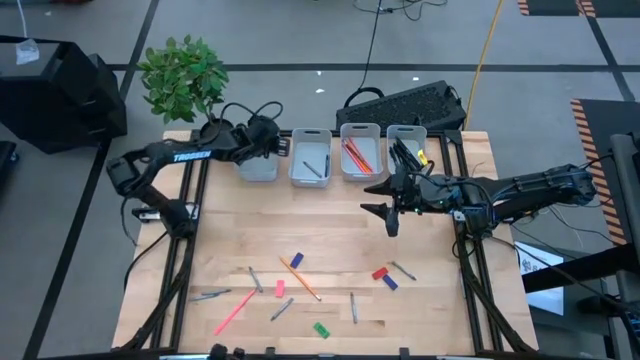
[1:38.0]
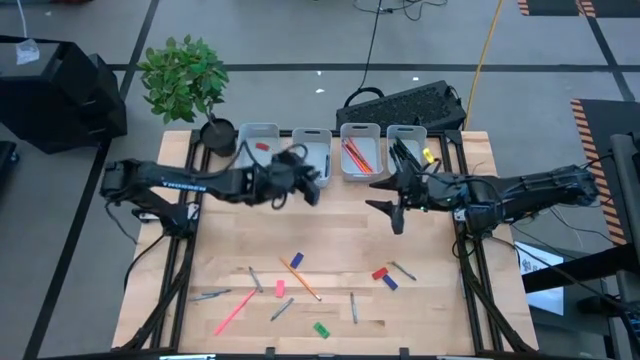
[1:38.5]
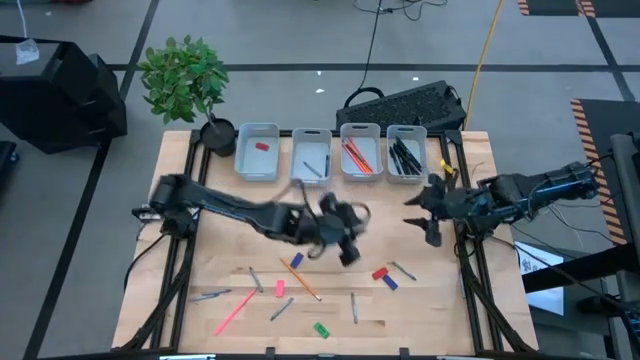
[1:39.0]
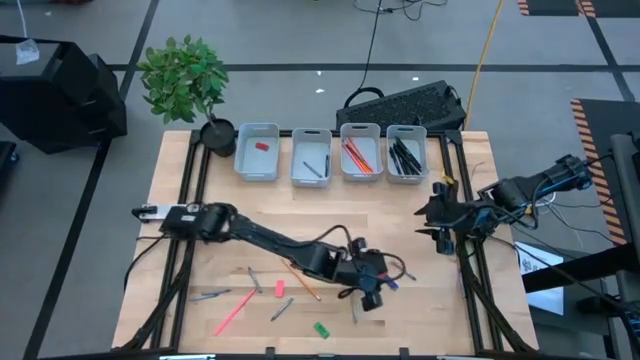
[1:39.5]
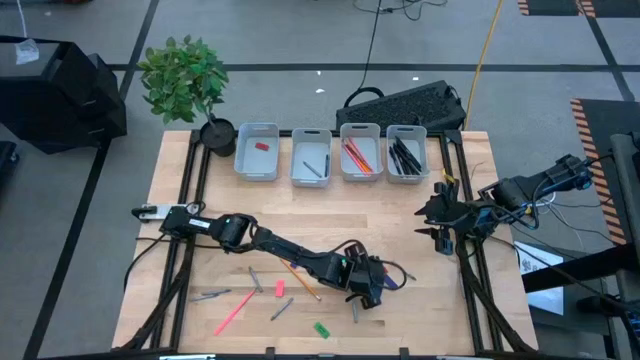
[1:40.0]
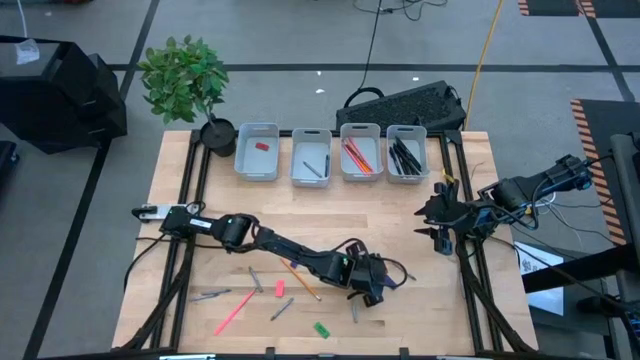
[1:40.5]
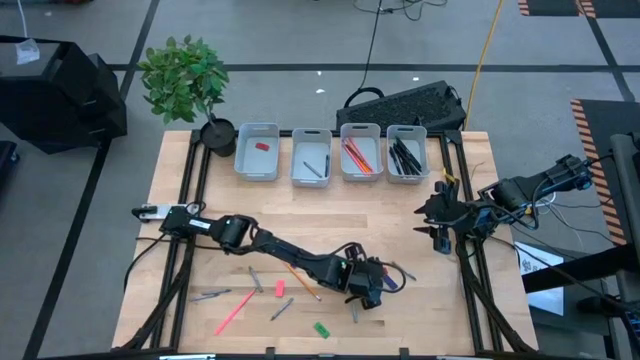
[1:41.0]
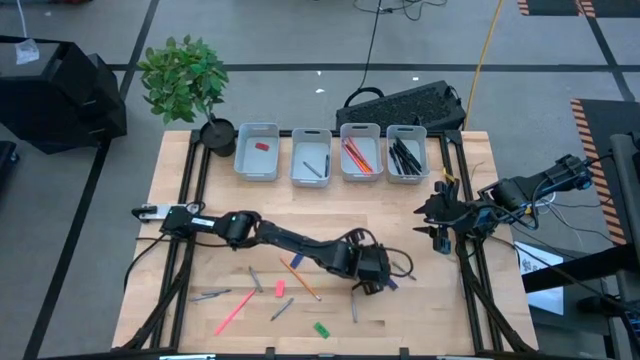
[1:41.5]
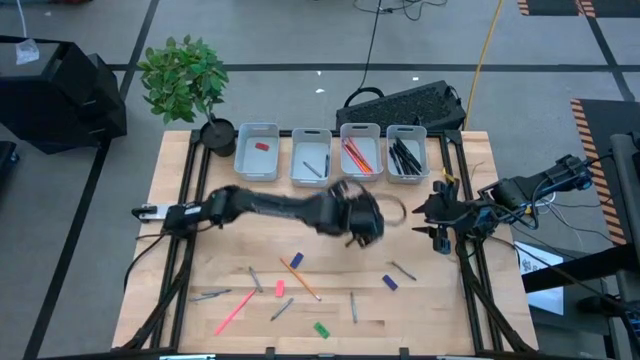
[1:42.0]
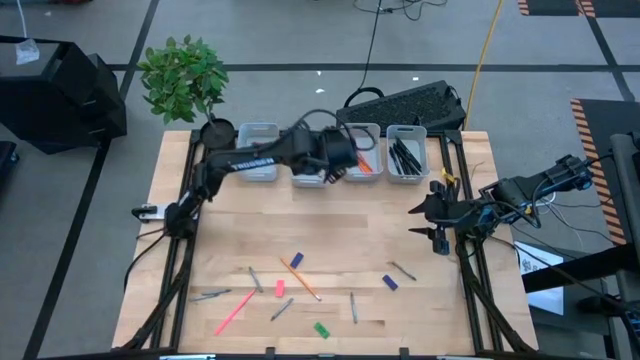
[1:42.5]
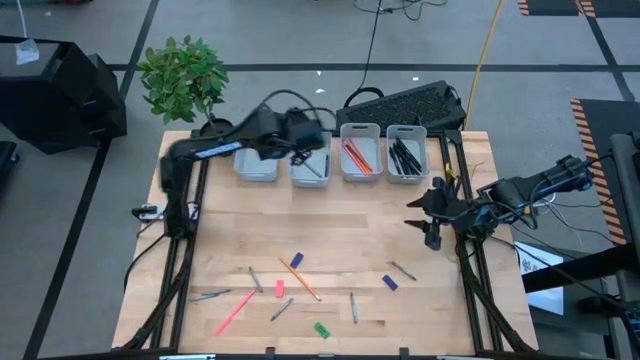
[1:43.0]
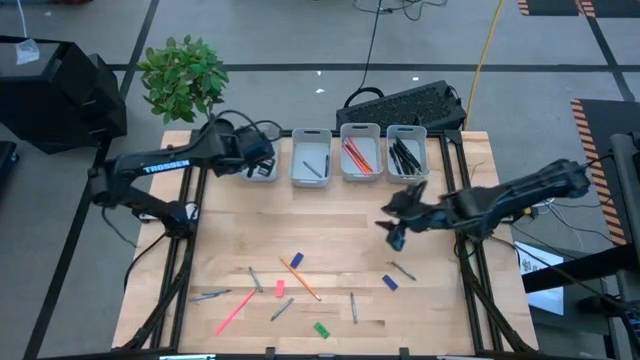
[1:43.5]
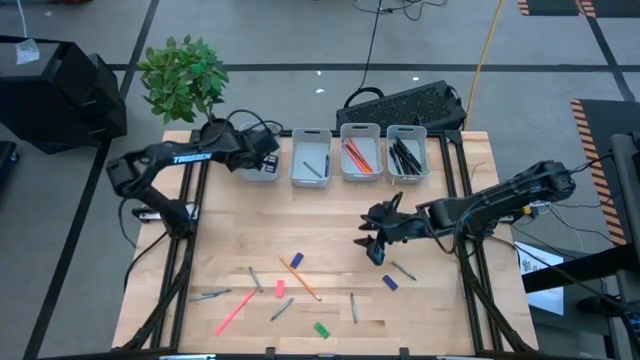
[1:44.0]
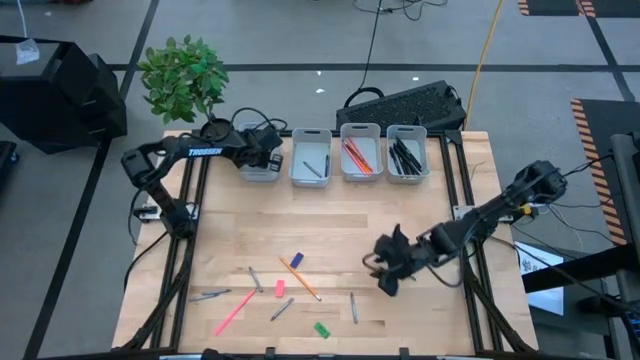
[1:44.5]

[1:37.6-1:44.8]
Task: Sort crayons/erasers/pens/pencils in bins
Put the red eraser into the top left gray bin

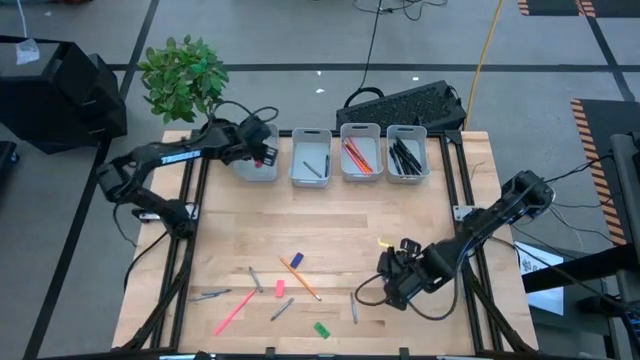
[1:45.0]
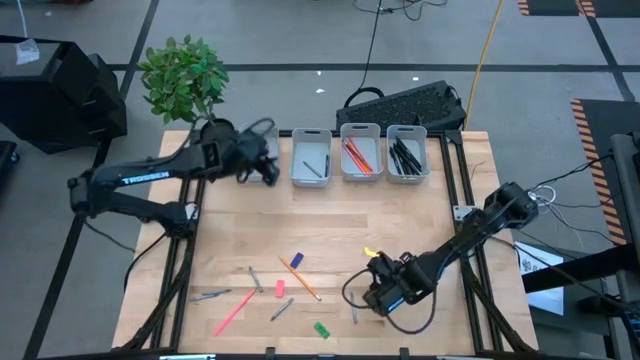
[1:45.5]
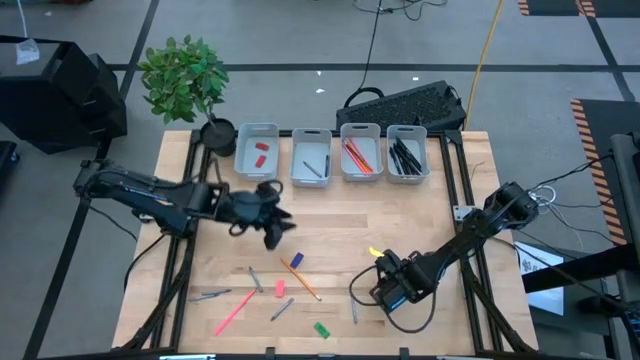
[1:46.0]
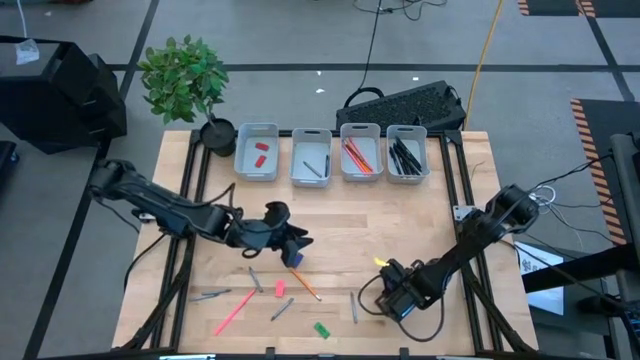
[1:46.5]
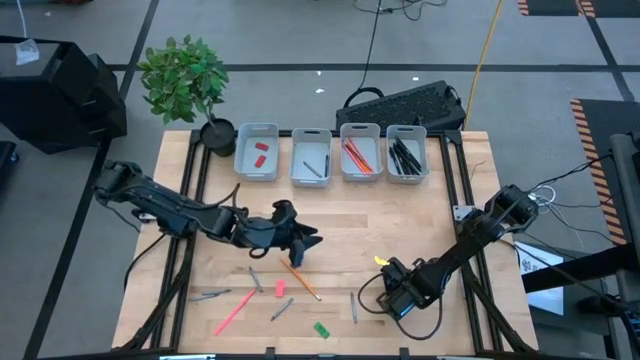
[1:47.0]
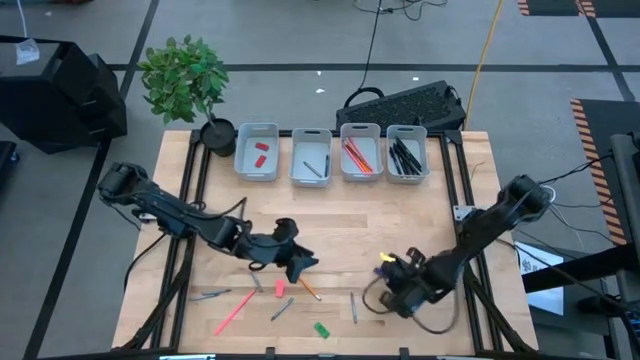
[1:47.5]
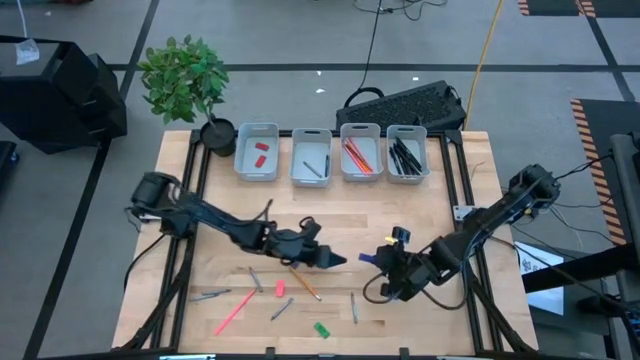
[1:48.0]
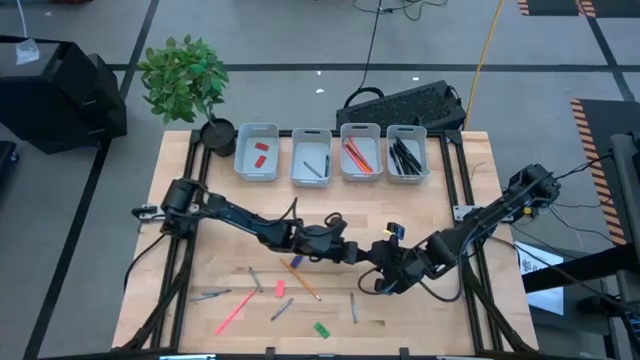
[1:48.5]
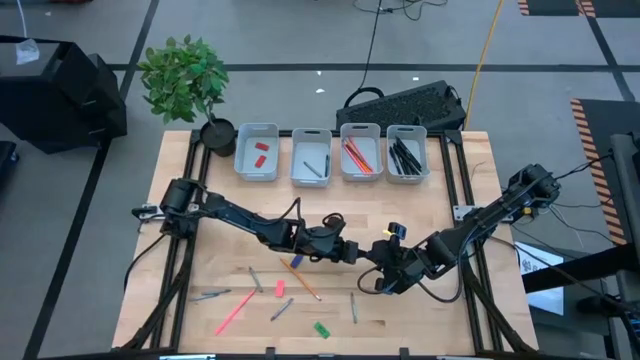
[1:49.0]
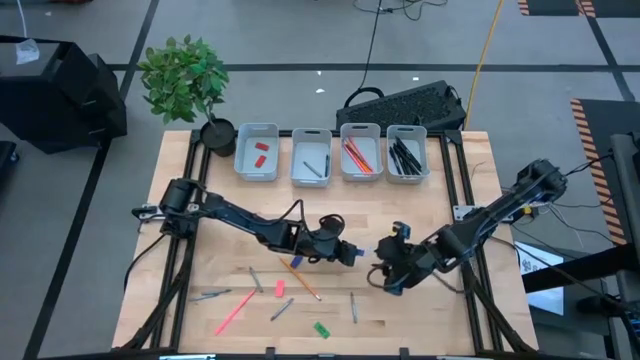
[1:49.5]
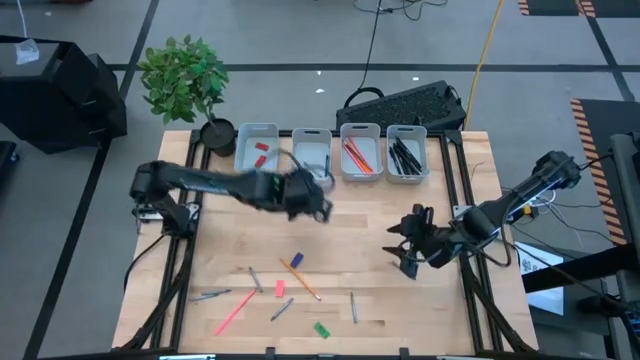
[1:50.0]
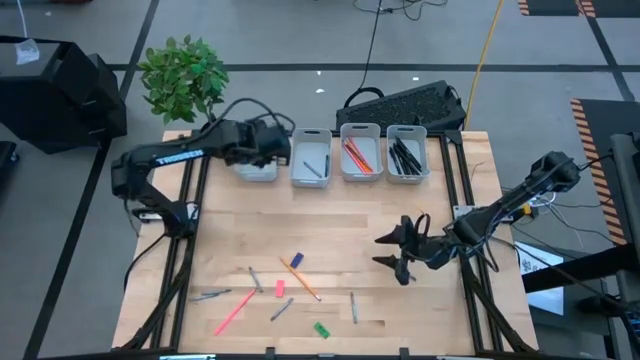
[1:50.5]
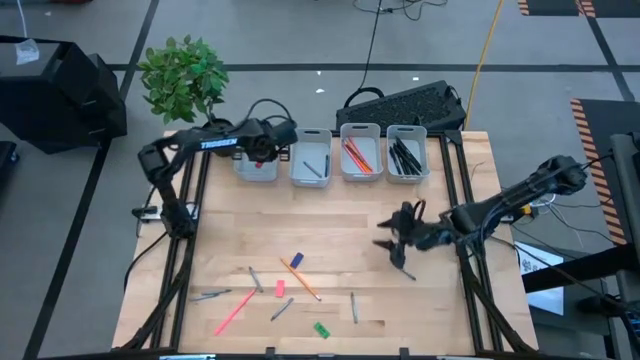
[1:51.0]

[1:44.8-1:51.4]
Put the blue eraser into the top left gray bin

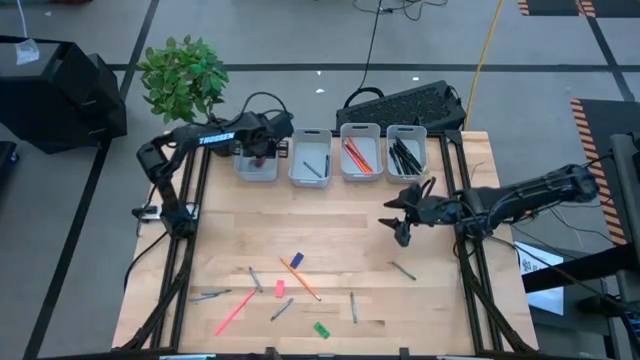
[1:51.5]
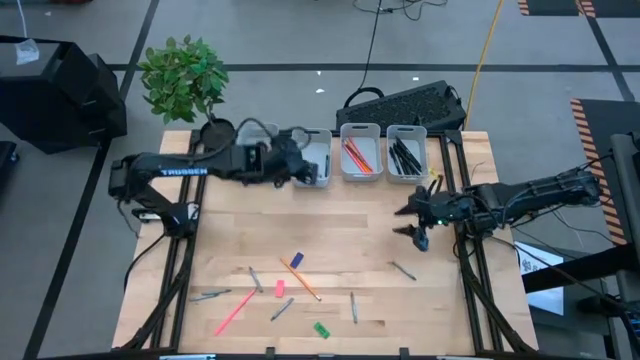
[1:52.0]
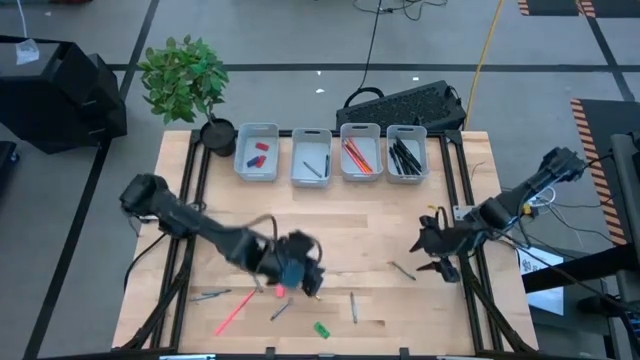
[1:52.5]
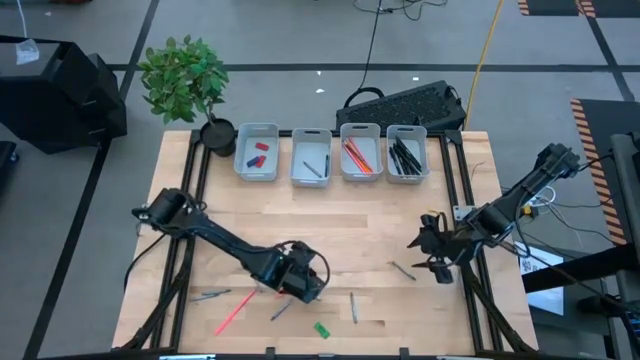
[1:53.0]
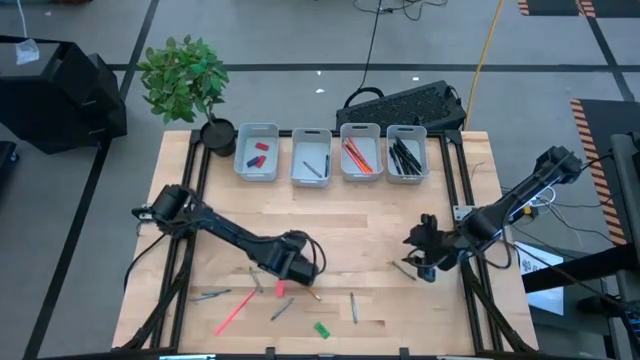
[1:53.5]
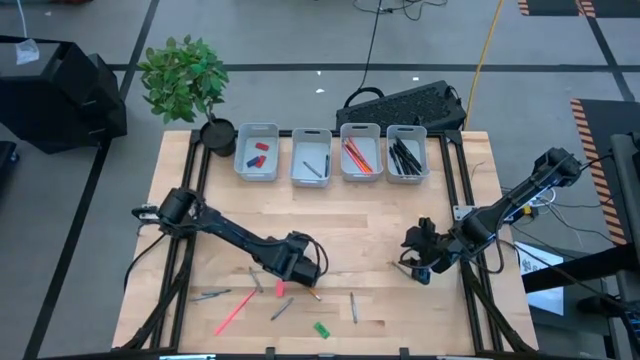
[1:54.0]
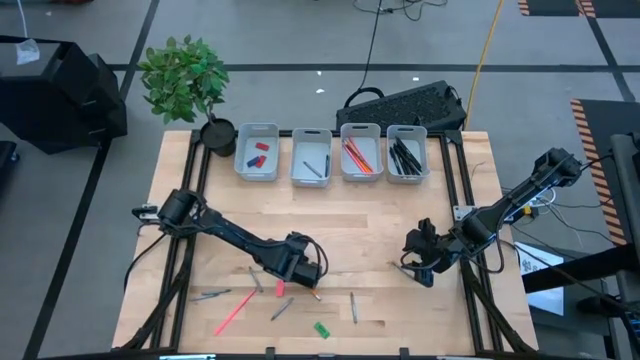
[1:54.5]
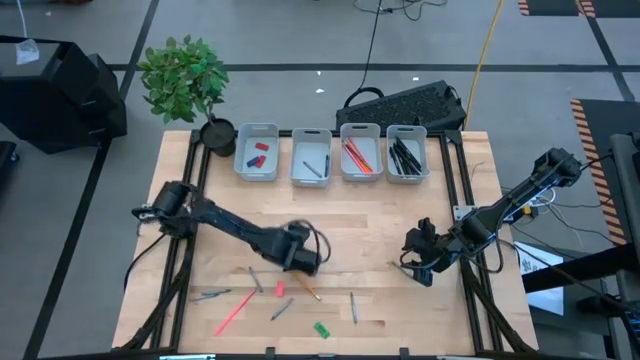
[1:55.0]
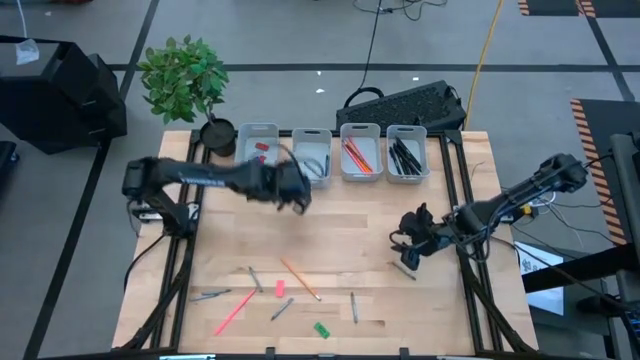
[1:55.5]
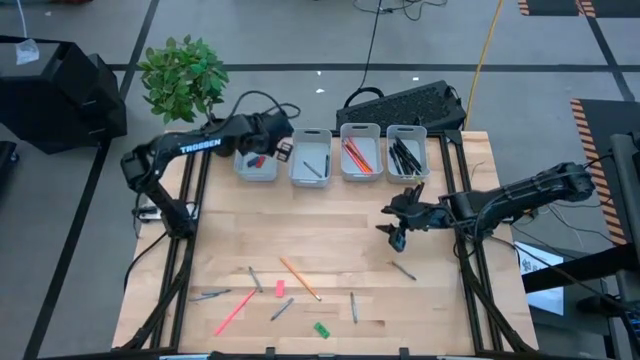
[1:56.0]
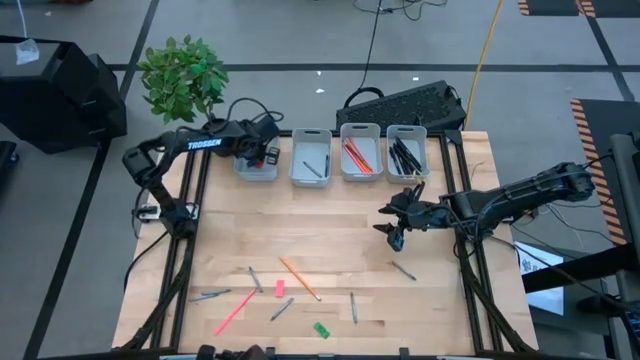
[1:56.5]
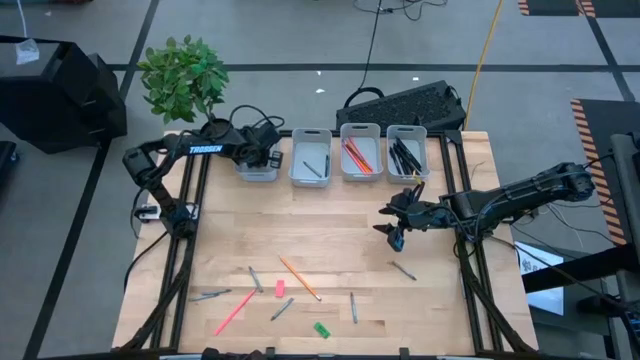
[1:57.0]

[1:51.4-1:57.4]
Put the blue eraser into the top left gray bin

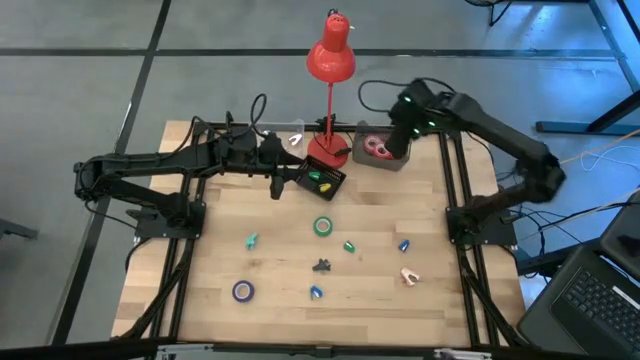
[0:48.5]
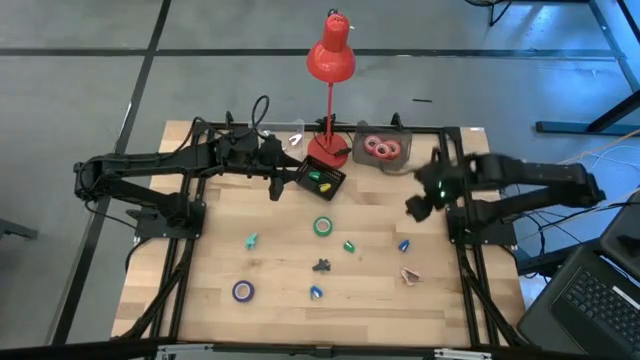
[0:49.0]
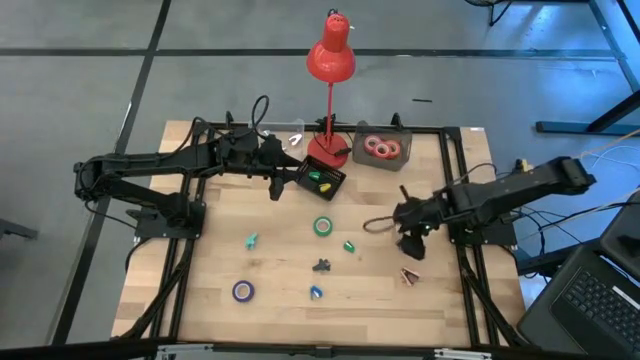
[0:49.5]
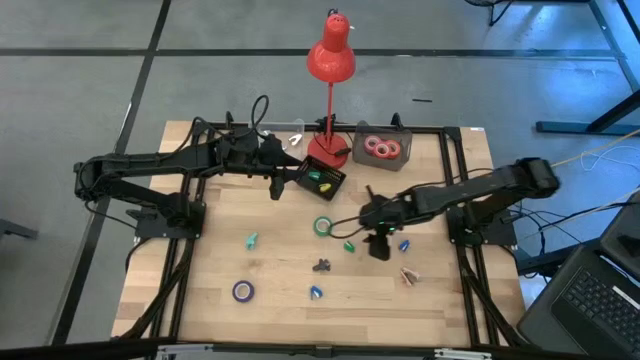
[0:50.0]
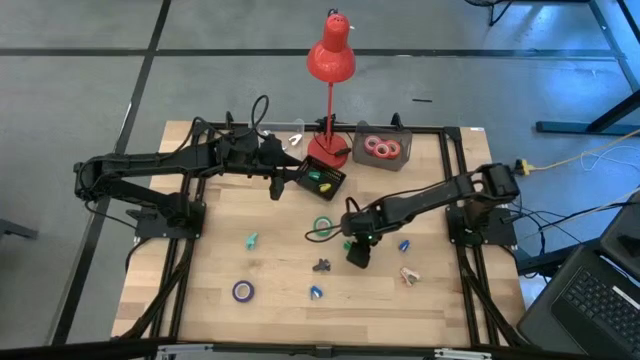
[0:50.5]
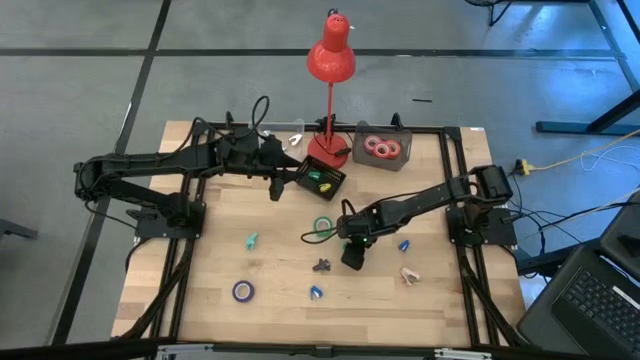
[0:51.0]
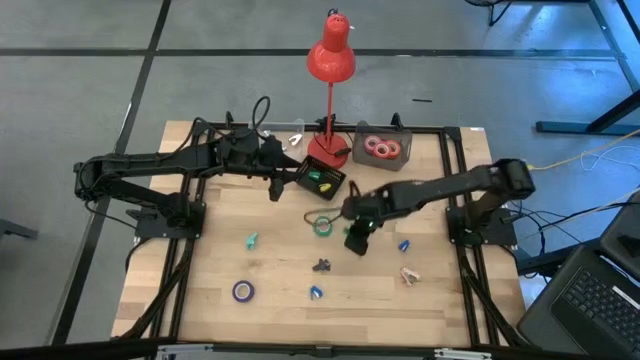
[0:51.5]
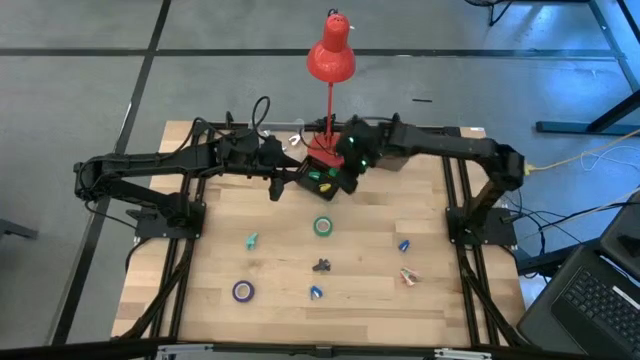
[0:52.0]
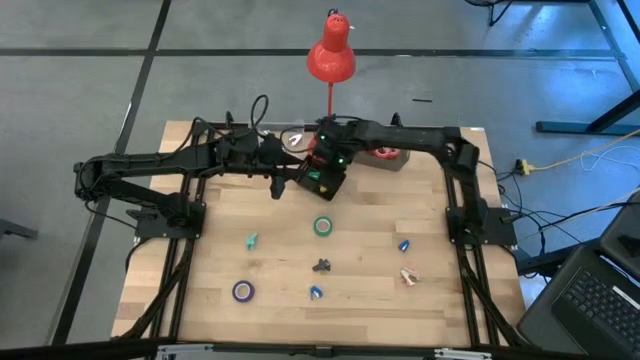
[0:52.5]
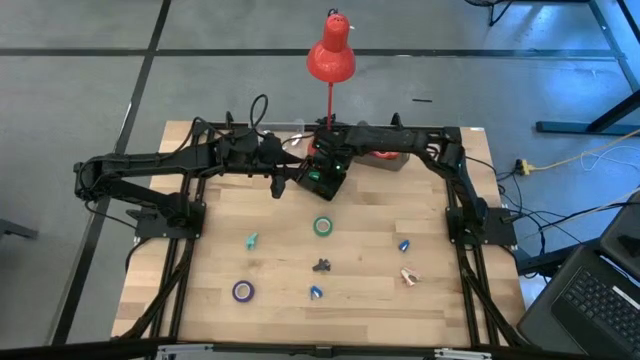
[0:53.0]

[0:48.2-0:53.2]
Task: Pick and place Stapler, Stapler remover, tape
Put the green stapler into the black bin
